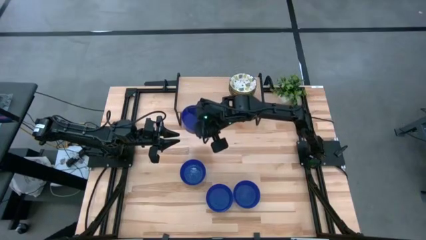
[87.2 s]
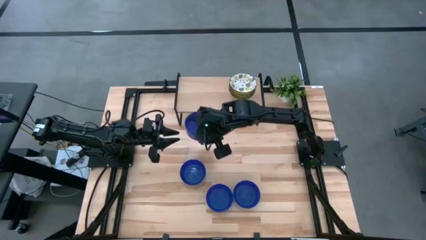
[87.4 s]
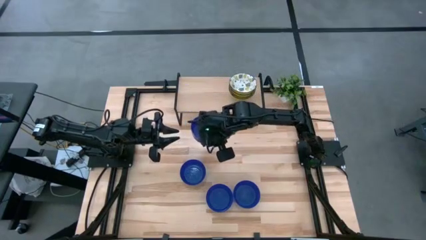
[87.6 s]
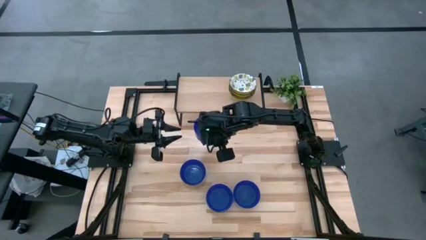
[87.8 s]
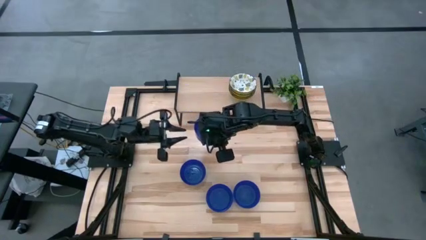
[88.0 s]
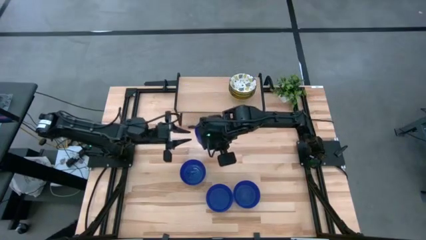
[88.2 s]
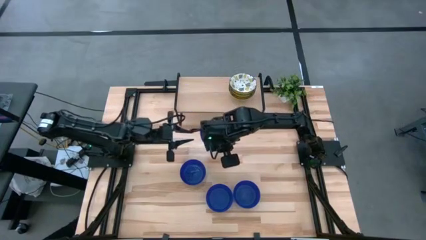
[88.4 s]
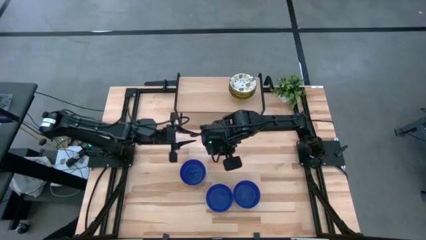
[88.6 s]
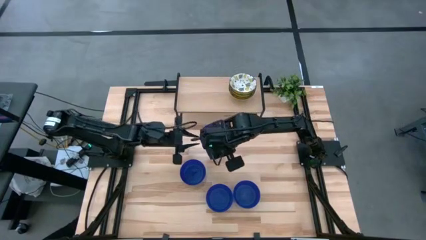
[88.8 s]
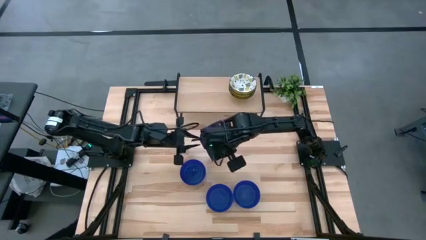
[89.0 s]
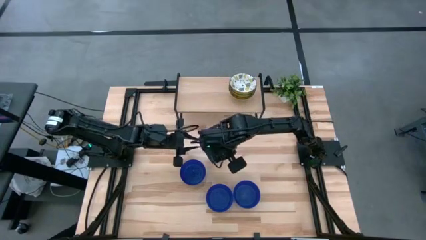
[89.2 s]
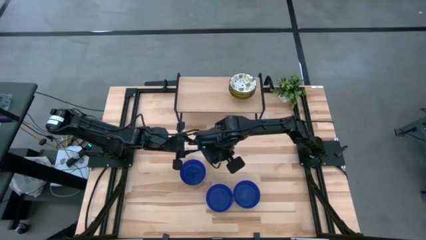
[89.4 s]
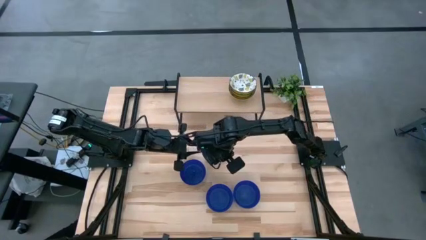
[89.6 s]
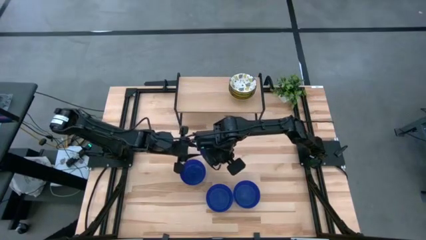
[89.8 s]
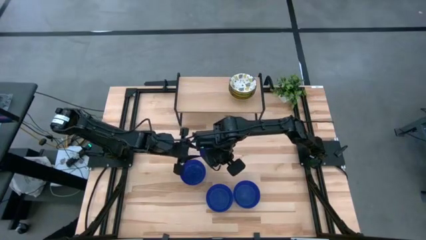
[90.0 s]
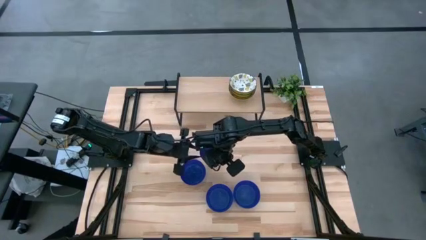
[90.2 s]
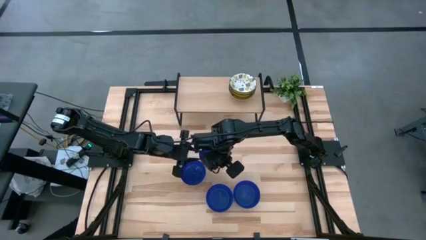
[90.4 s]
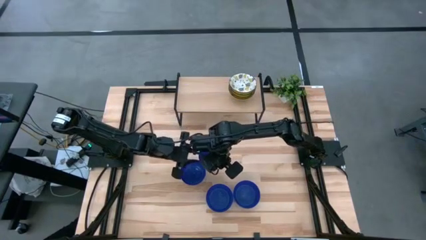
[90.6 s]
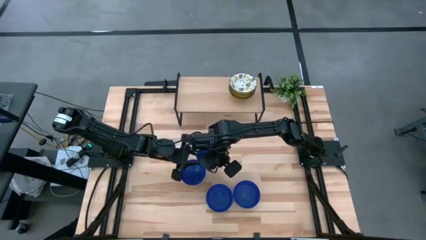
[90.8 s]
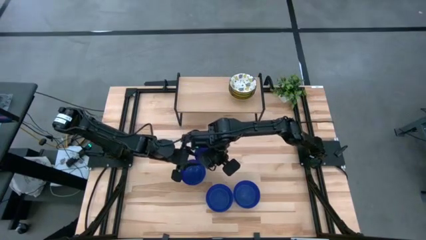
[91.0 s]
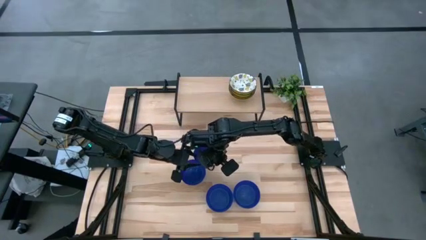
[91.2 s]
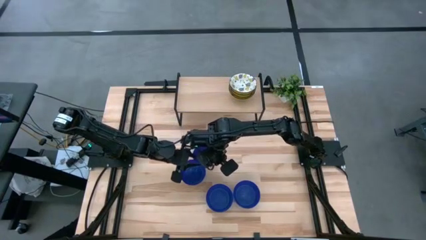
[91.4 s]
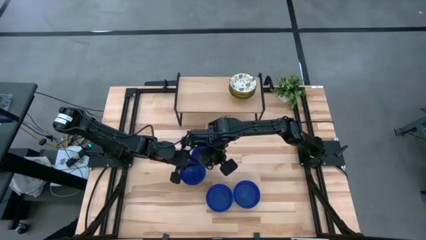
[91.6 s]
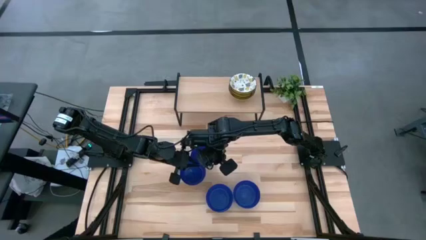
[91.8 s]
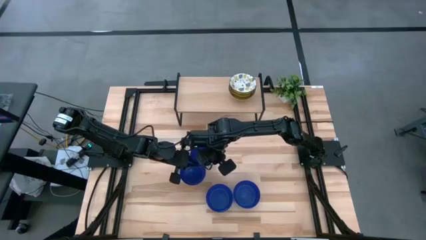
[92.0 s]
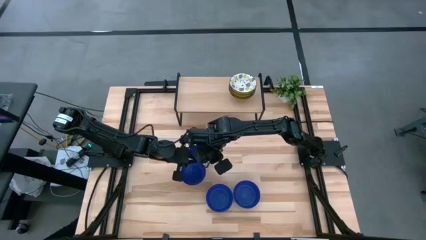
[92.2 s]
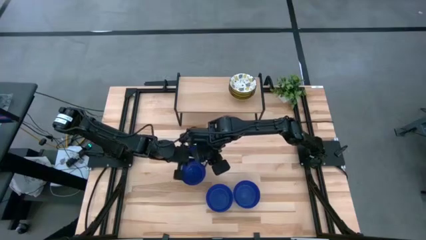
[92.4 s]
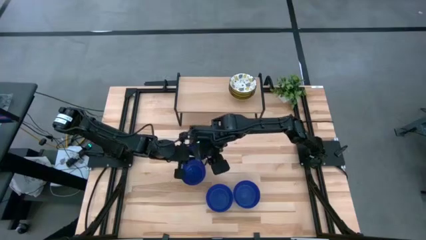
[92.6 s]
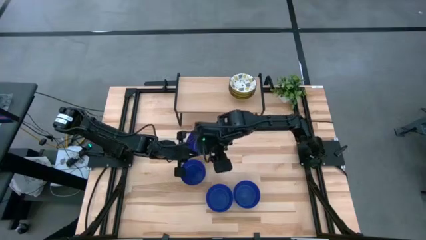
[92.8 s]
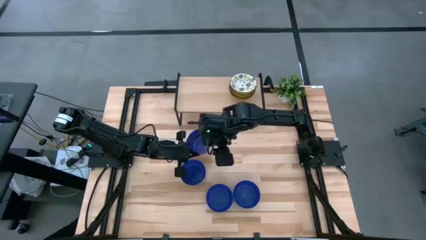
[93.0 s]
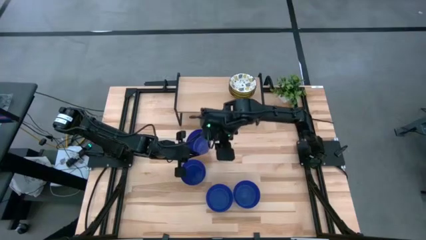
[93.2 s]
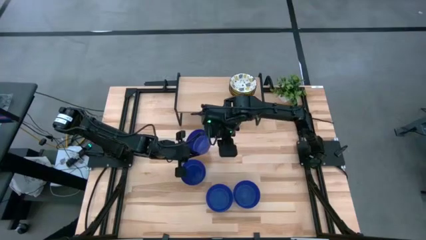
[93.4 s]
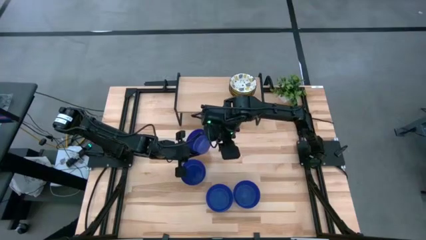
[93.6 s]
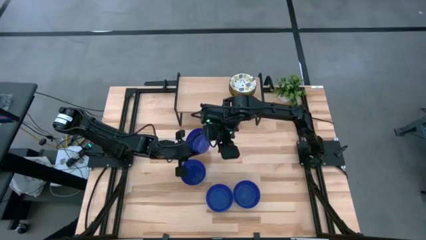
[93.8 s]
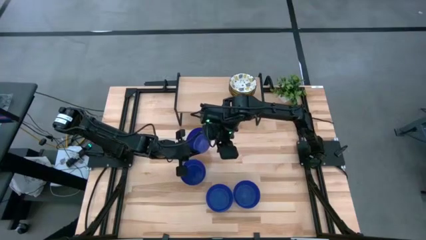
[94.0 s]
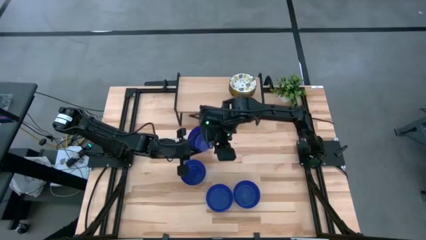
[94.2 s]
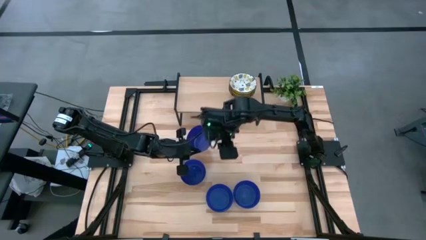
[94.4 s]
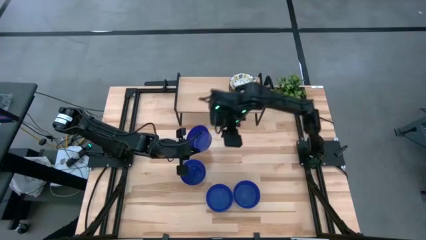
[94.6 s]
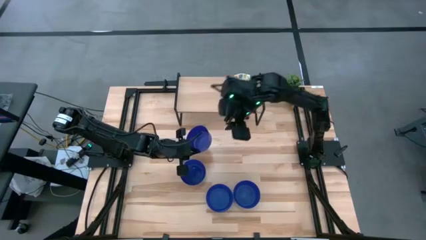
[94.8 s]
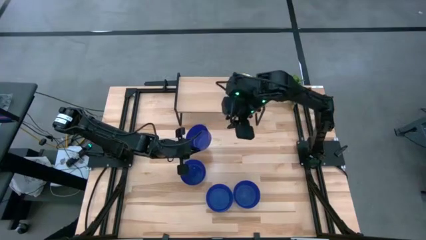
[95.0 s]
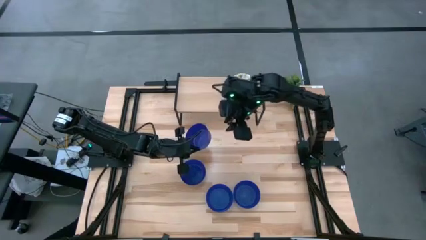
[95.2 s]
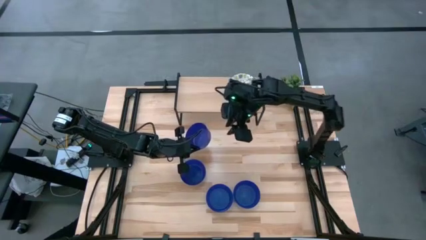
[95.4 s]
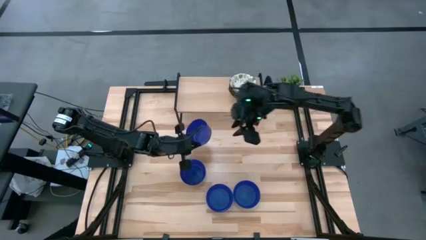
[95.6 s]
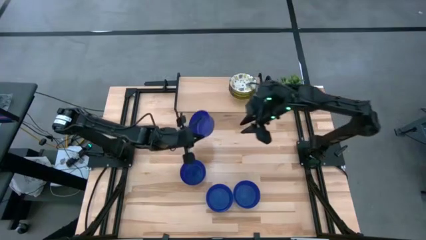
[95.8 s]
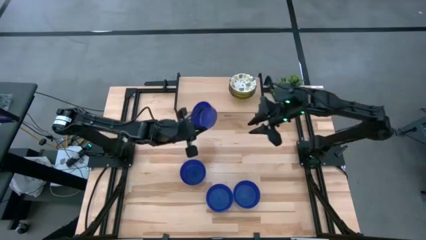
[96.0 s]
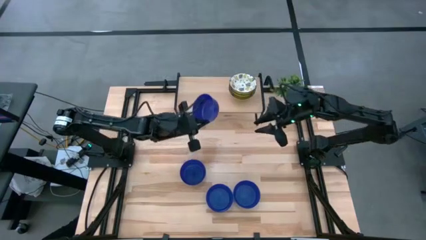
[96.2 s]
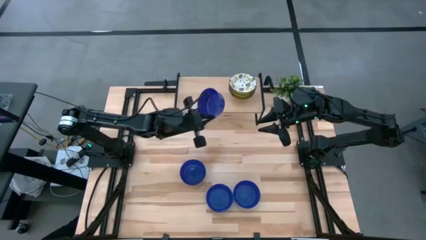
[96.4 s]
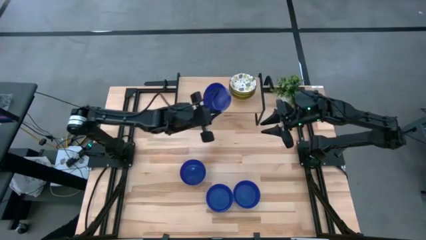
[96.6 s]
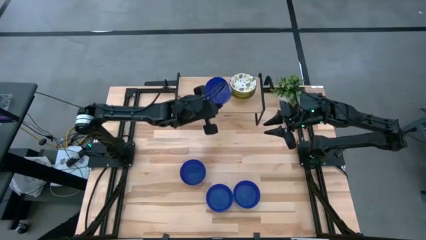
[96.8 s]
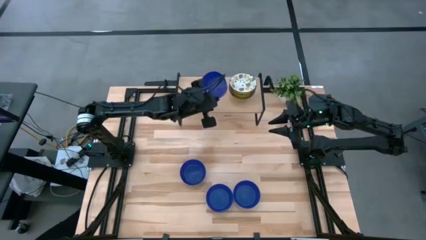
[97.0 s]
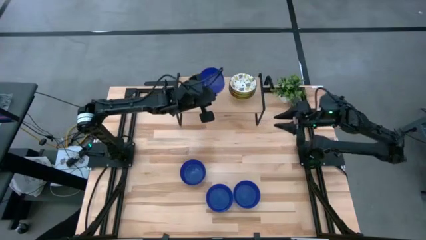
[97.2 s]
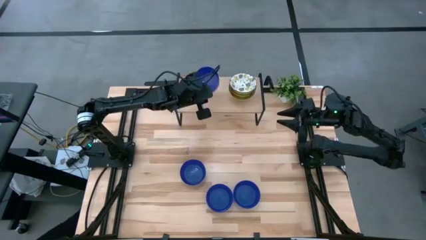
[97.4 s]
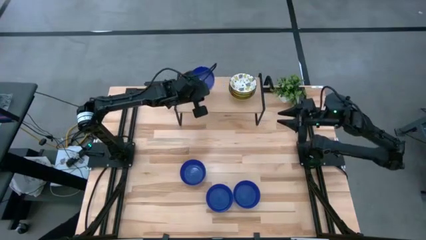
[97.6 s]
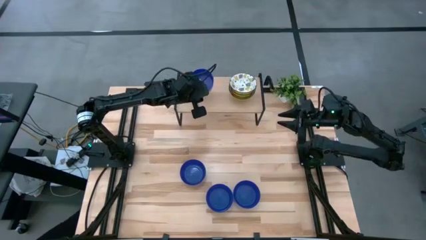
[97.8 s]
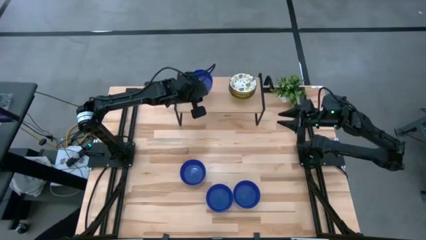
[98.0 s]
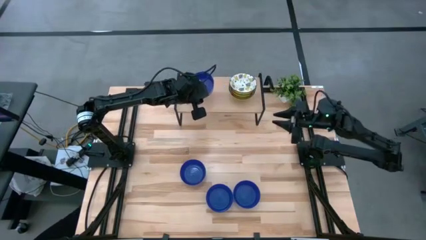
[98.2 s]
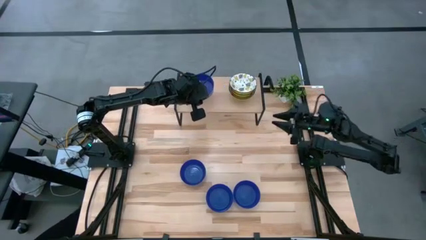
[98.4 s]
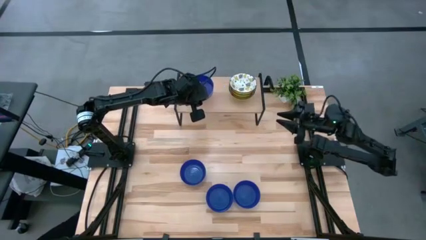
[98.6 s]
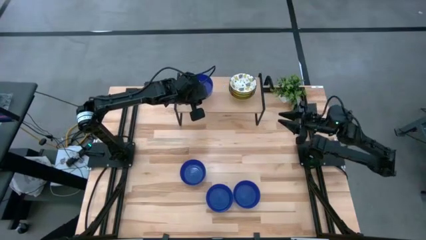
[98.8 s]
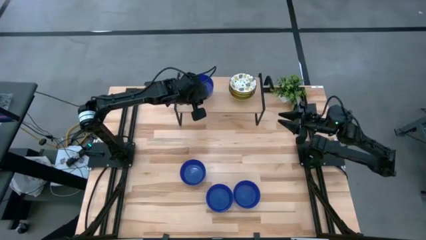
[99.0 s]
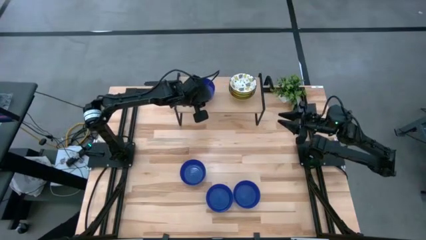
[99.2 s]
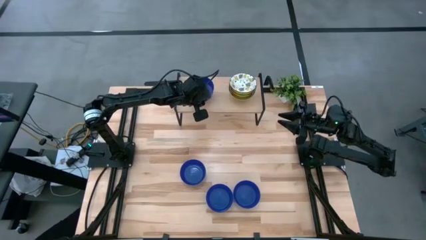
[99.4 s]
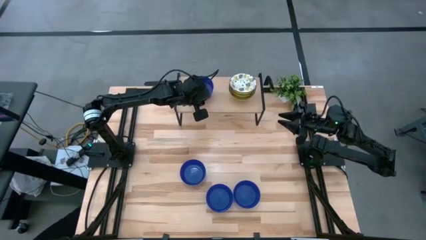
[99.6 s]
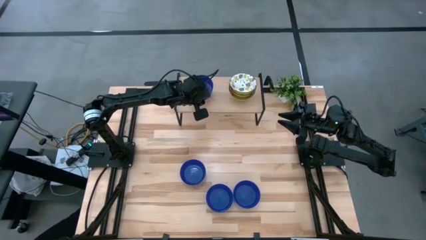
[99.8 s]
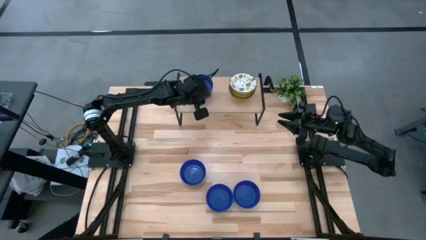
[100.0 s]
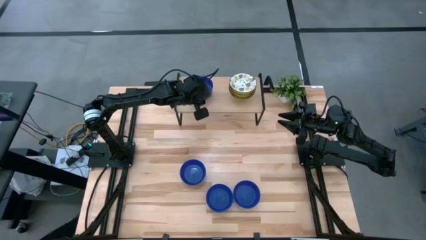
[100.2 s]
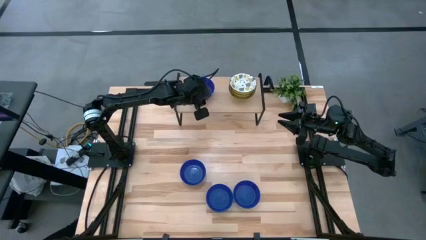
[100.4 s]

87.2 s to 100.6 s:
Task: Pick & Place Mini bowls
Put the blue bowl on the shelf

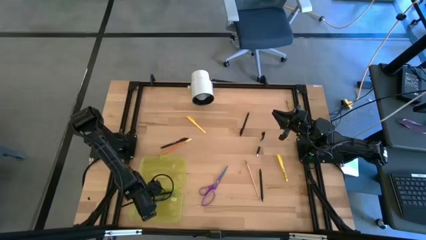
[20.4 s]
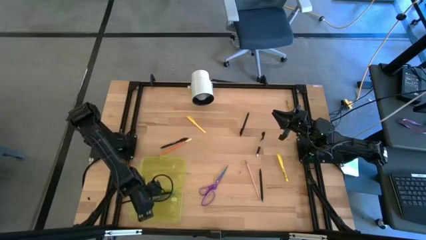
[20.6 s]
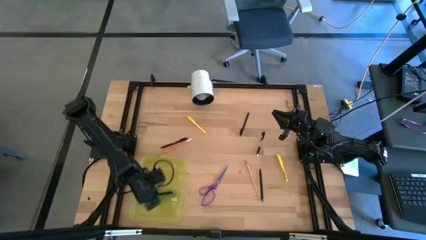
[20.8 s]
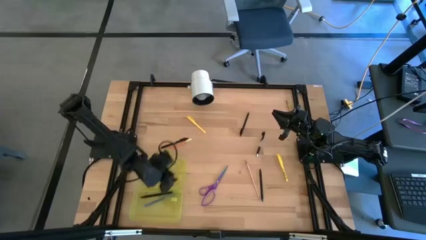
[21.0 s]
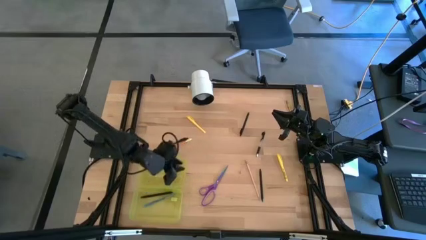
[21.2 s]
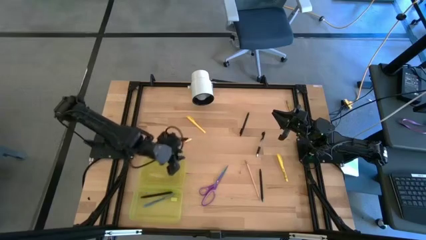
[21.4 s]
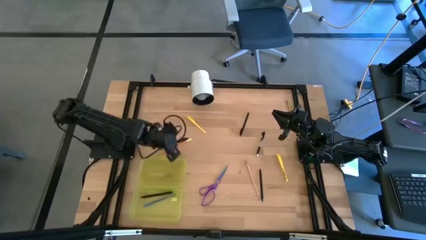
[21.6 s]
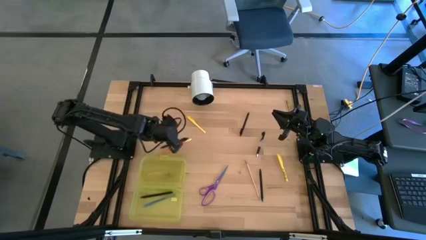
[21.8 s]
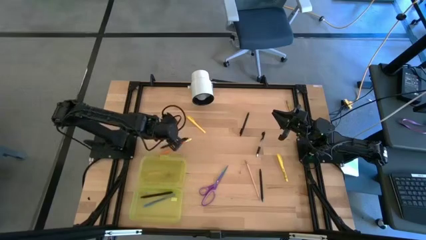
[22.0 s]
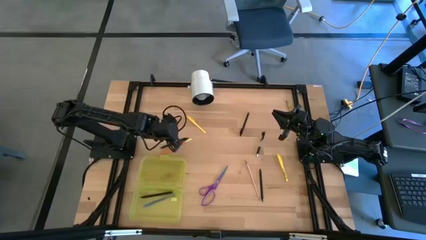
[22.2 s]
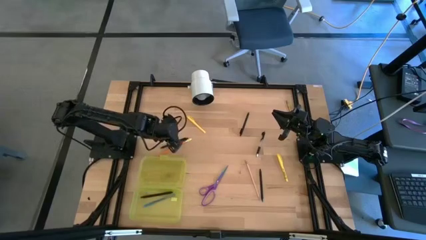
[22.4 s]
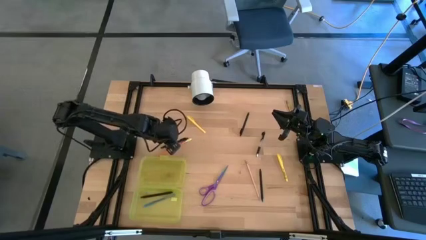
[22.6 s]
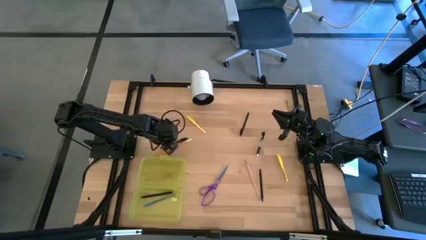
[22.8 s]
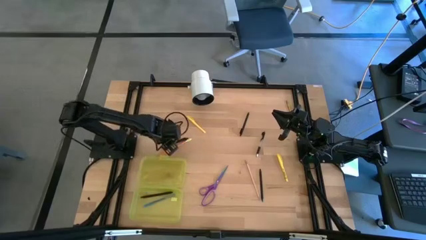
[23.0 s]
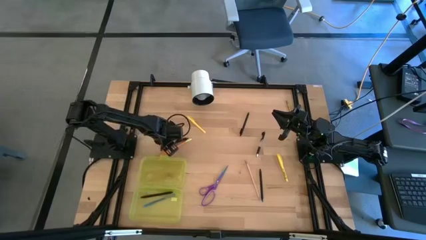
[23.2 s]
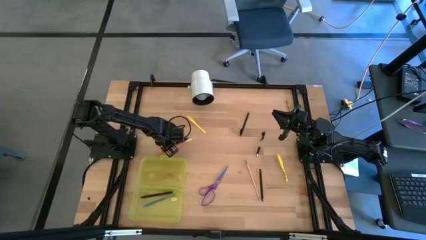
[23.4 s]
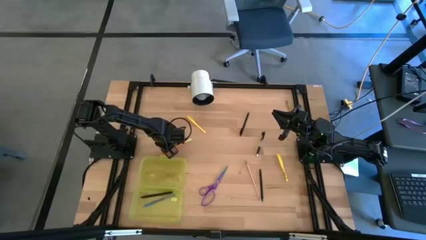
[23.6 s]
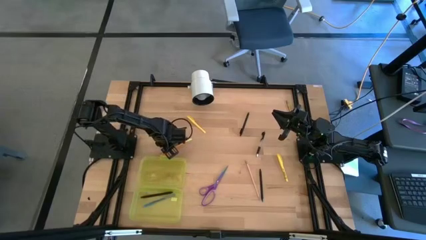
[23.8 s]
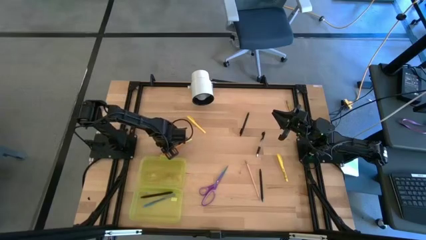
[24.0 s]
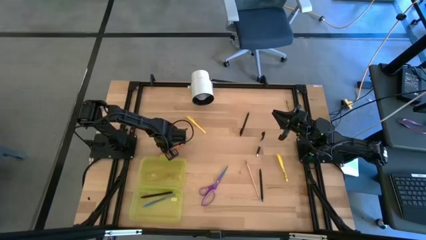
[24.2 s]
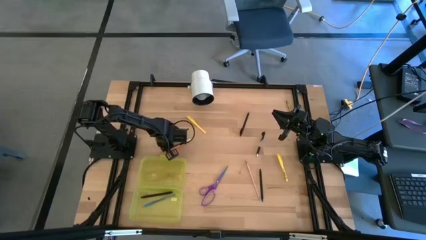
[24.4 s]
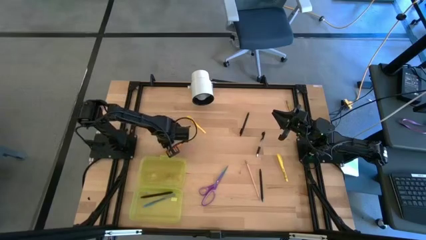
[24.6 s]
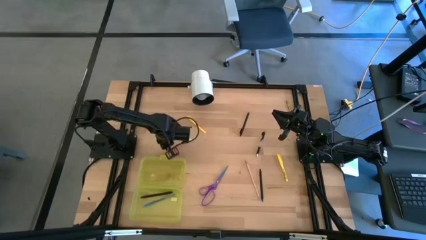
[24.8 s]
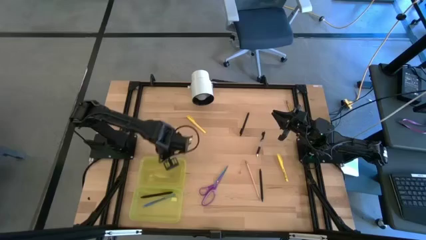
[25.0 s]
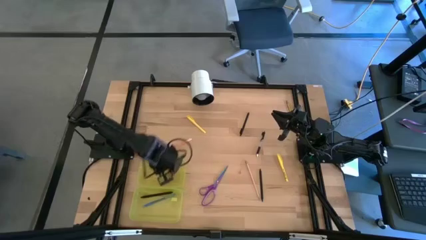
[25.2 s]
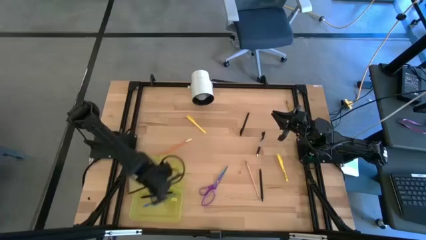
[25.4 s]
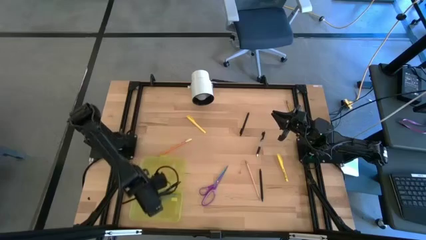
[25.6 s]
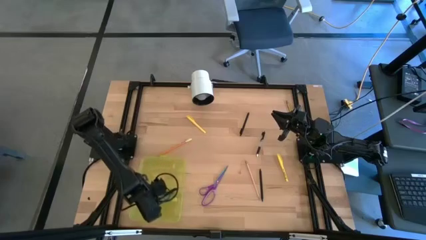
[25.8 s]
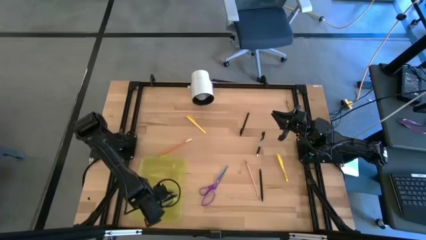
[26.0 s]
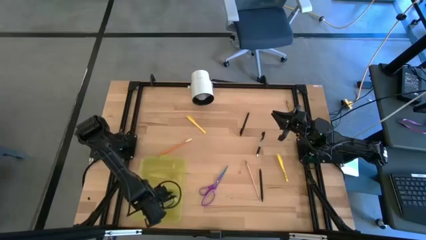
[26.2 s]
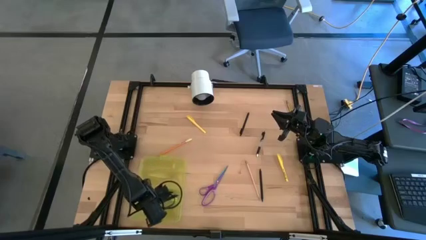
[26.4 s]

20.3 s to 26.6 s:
Task: Pick & place school supplies into a supply box
Put the black pen into the yellow supply box
